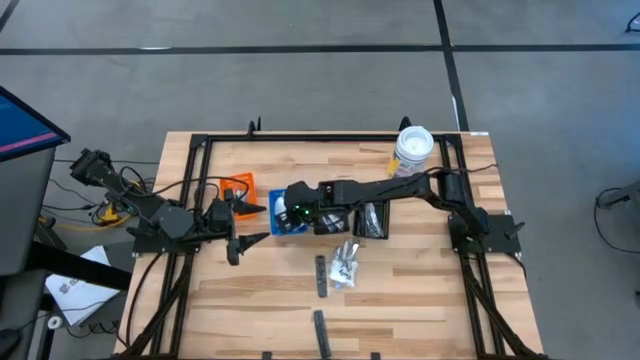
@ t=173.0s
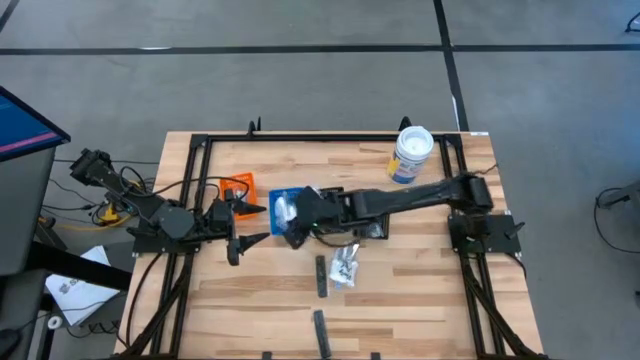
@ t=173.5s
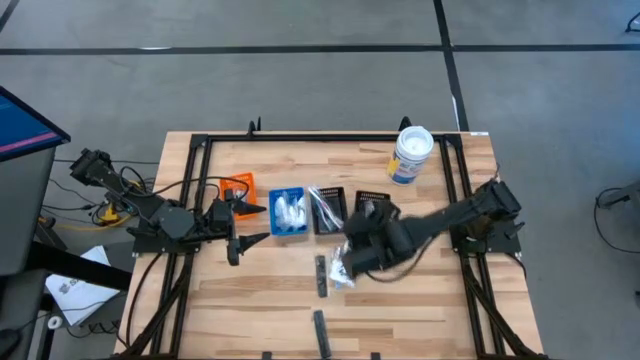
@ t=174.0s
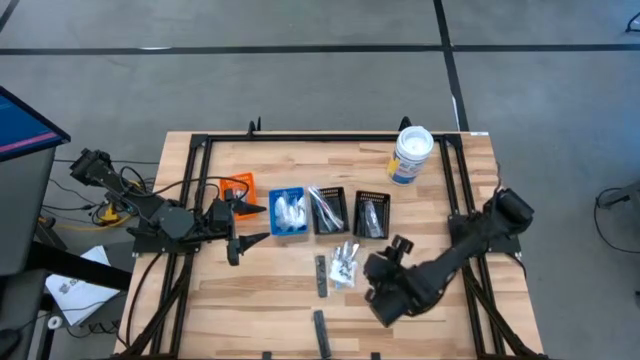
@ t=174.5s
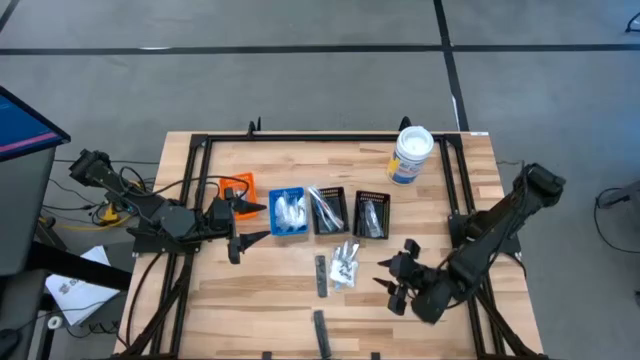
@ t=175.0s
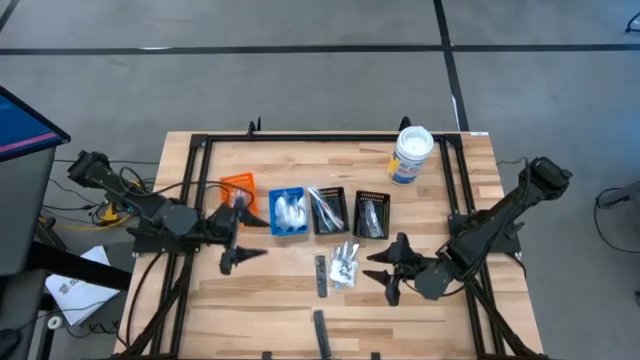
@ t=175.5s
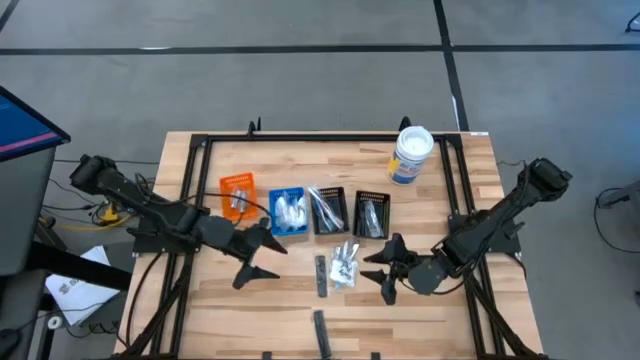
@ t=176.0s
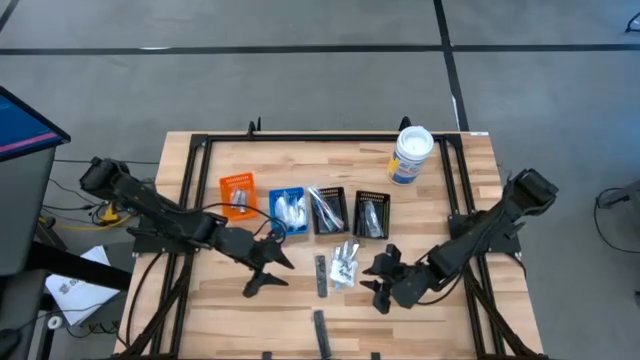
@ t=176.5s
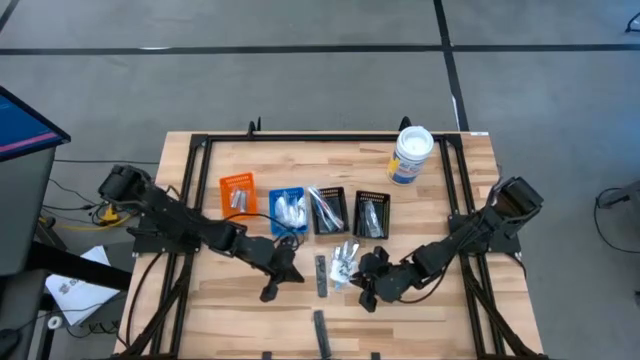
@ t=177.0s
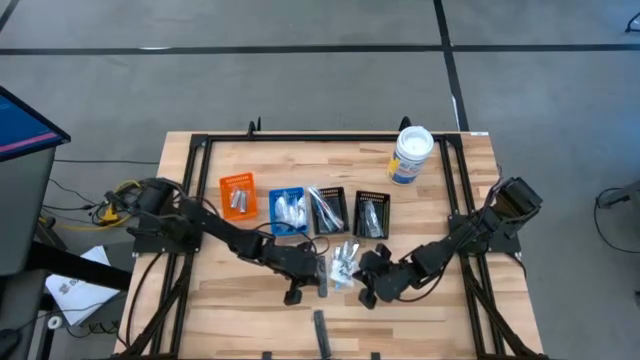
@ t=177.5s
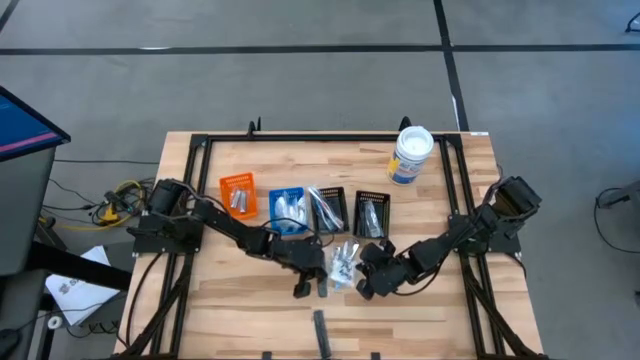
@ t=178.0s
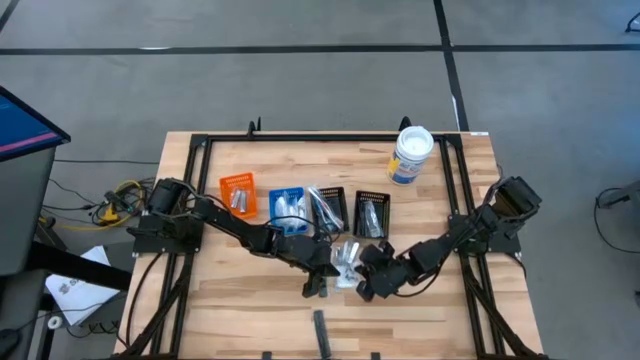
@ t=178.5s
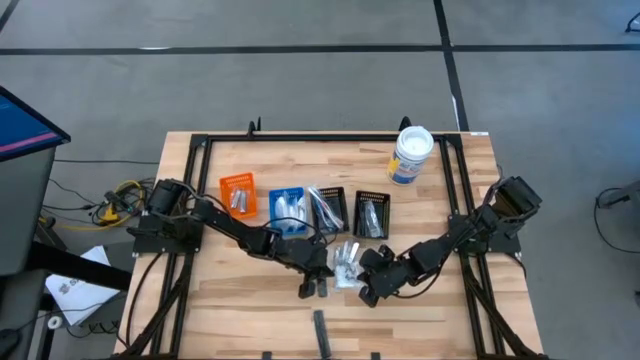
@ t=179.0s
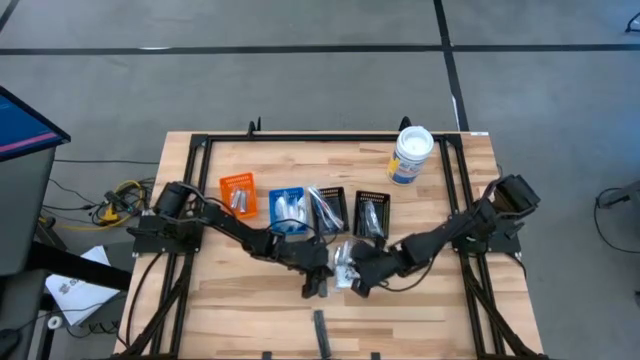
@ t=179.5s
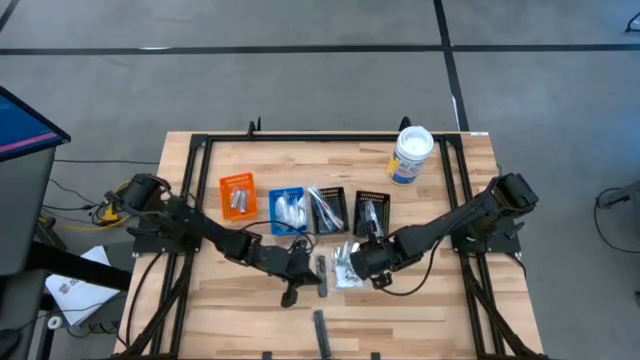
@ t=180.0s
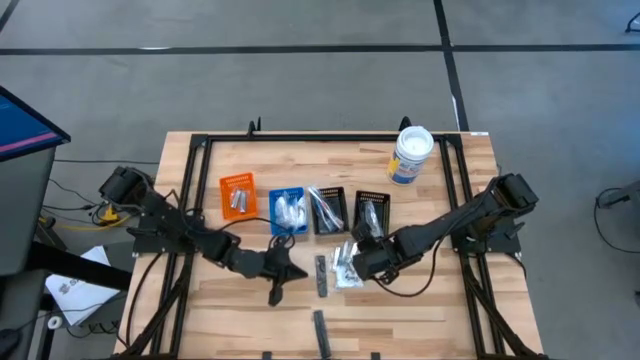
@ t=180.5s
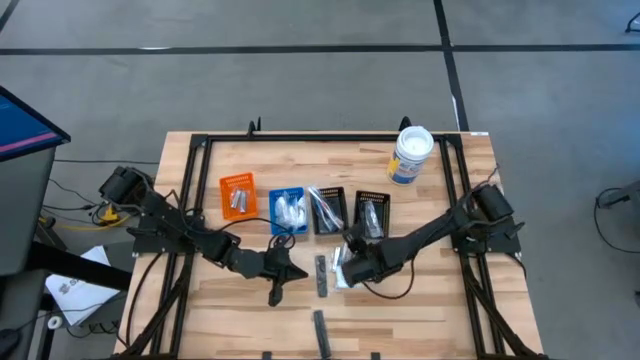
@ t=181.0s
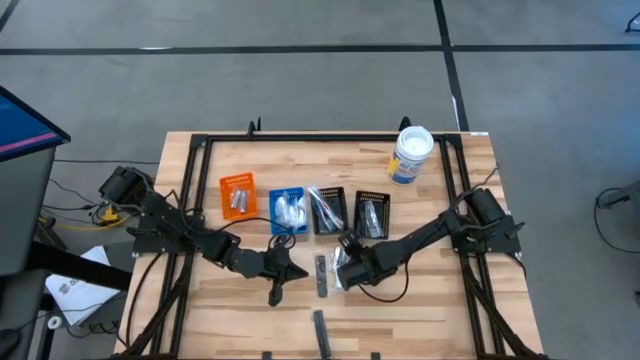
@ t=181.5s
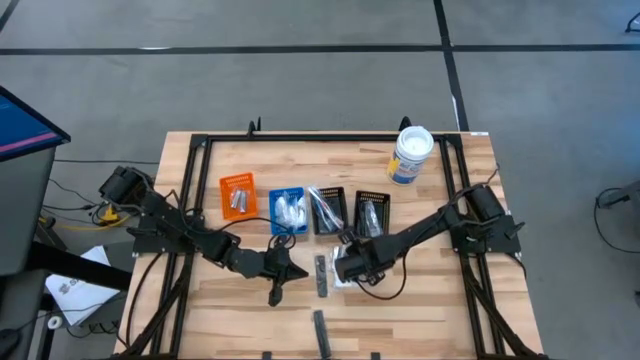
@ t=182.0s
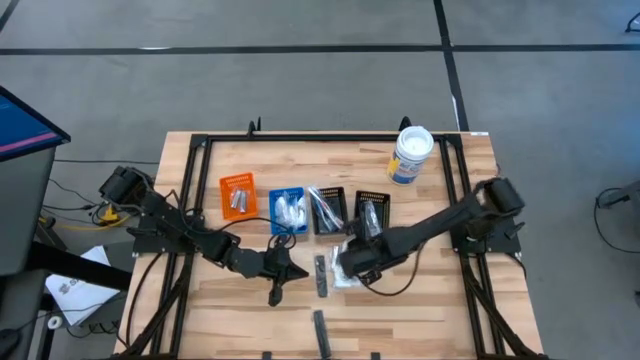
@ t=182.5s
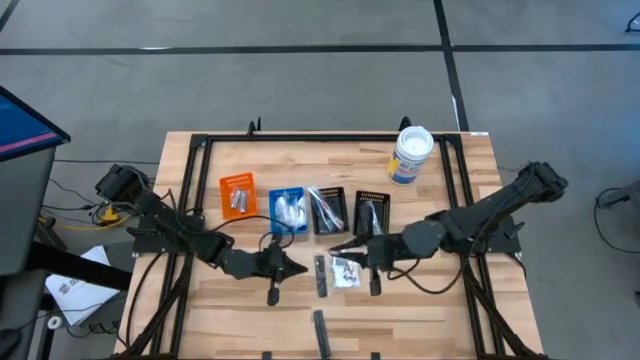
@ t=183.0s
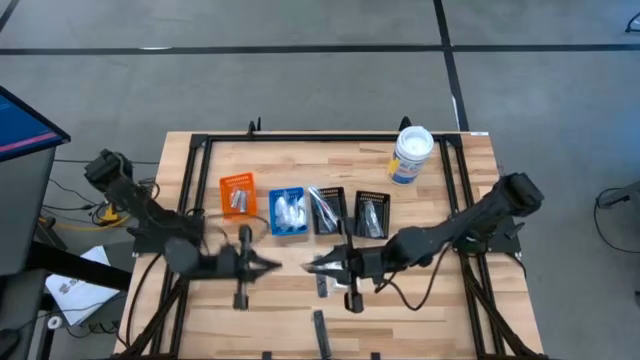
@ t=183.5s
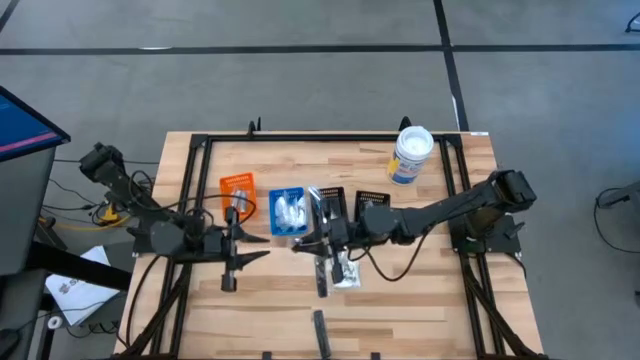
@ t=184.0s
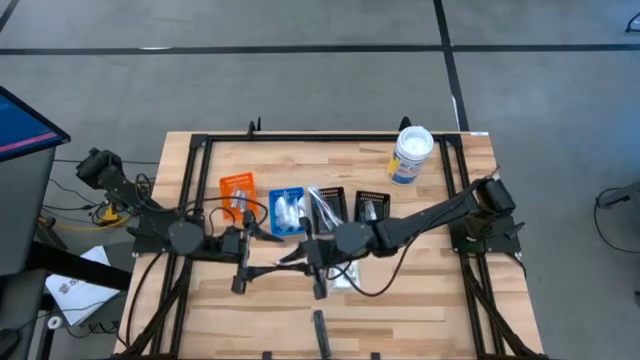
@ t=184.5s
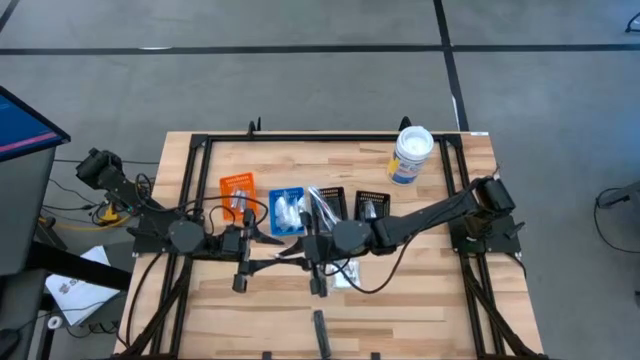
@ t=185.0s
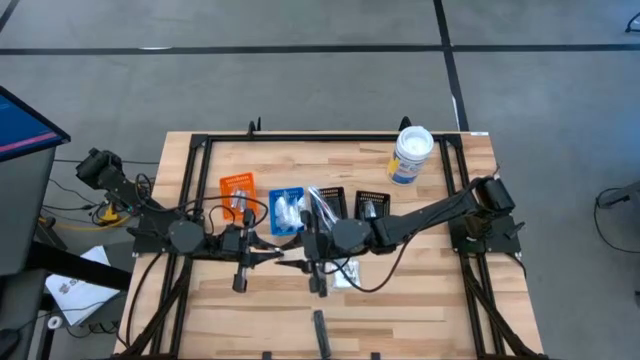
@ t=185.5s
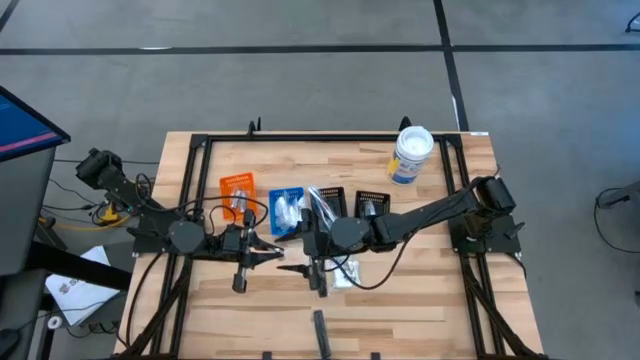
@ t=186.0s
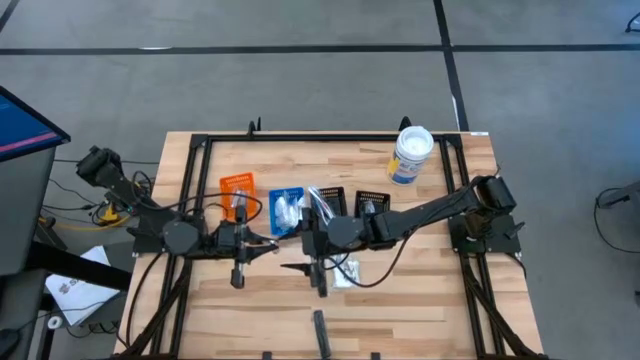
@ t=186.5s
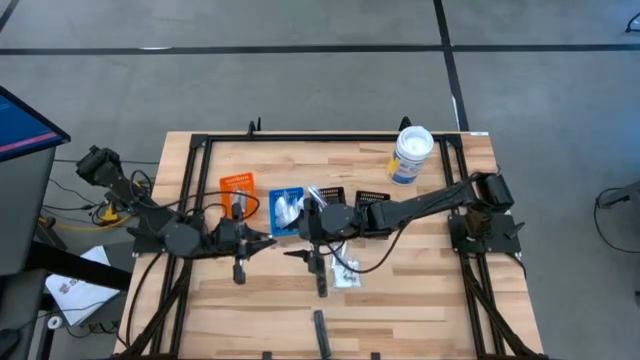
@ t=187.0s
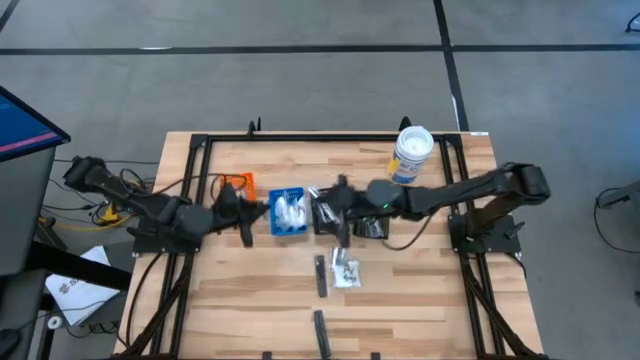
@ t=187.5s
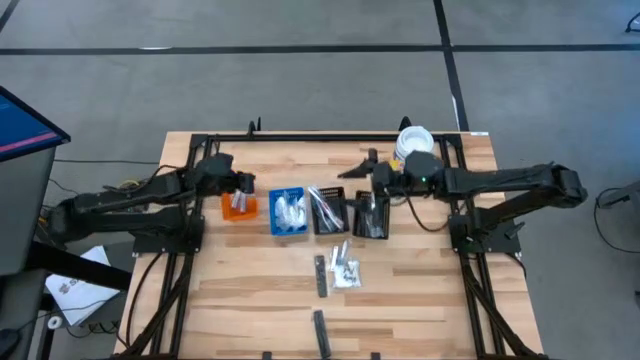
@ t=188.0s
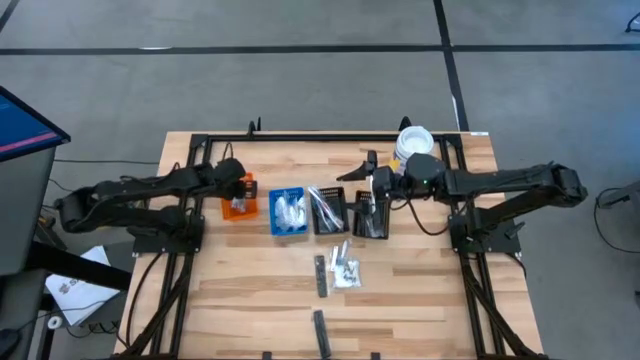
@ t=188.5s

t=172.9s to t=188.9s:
Task: Pick & Place Travel size toiletries
Put the nail clippers into the orange bin

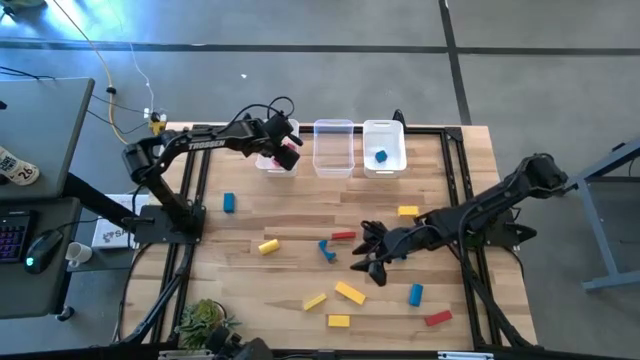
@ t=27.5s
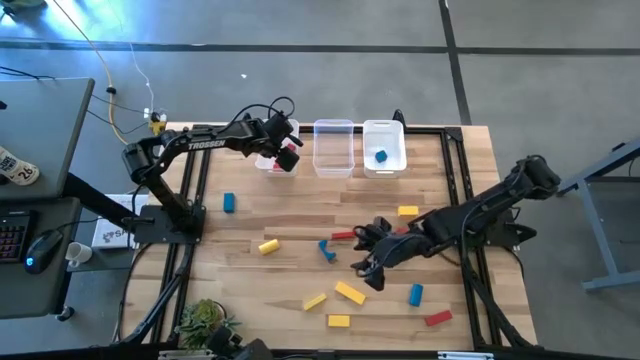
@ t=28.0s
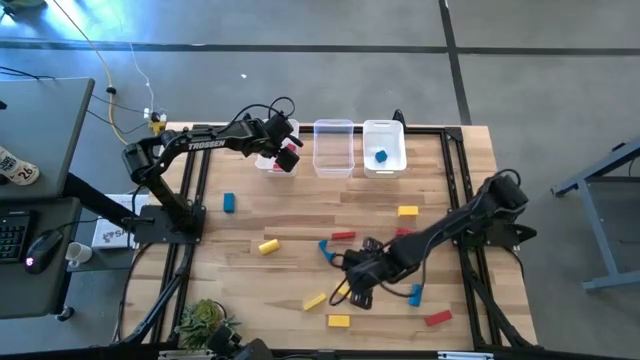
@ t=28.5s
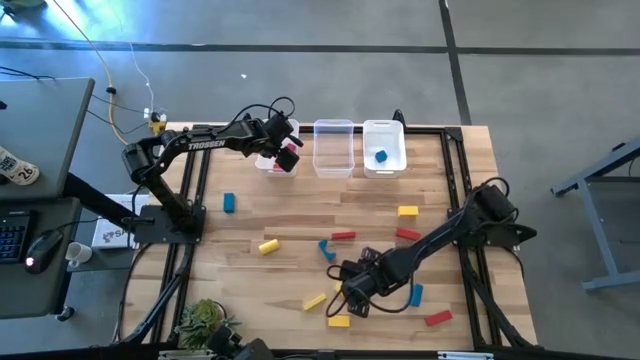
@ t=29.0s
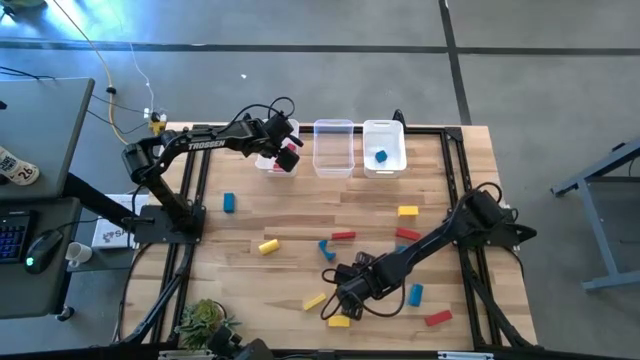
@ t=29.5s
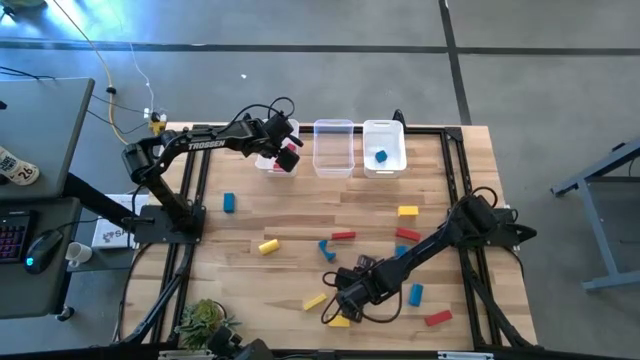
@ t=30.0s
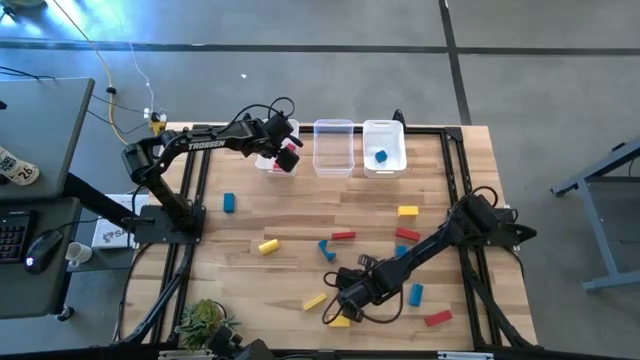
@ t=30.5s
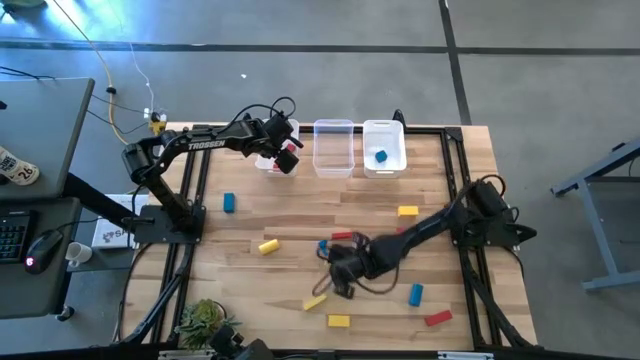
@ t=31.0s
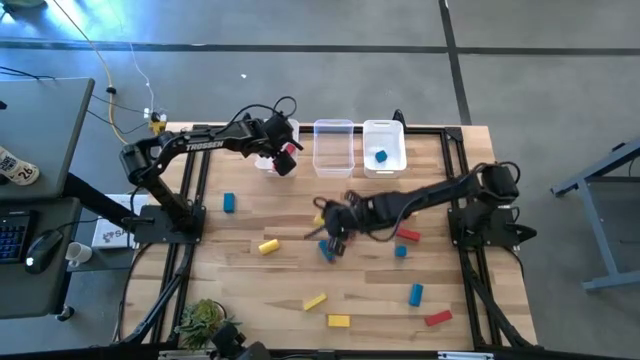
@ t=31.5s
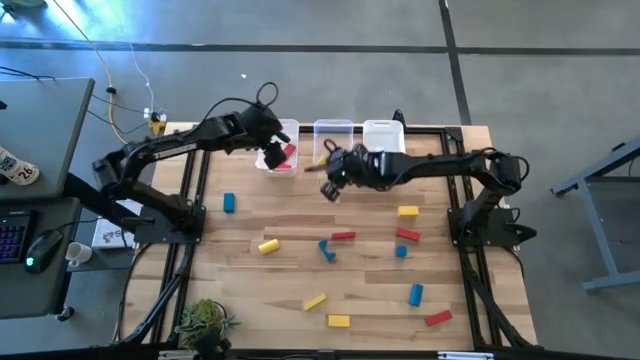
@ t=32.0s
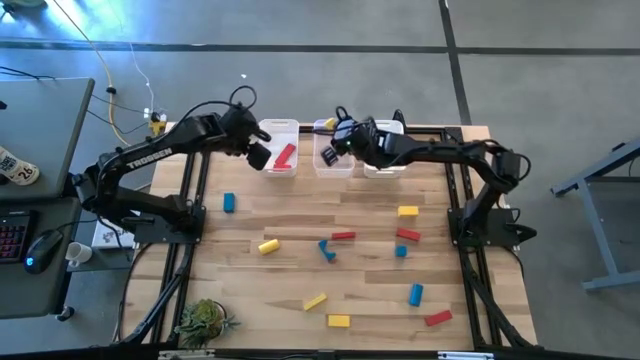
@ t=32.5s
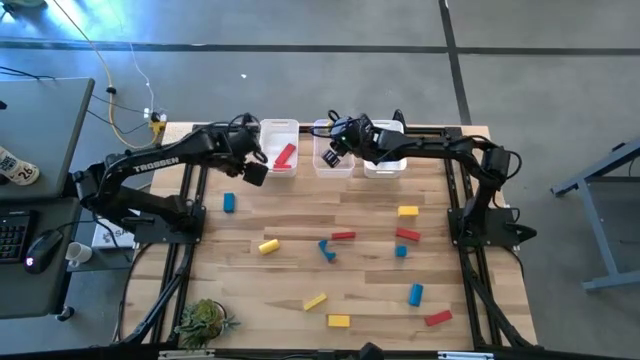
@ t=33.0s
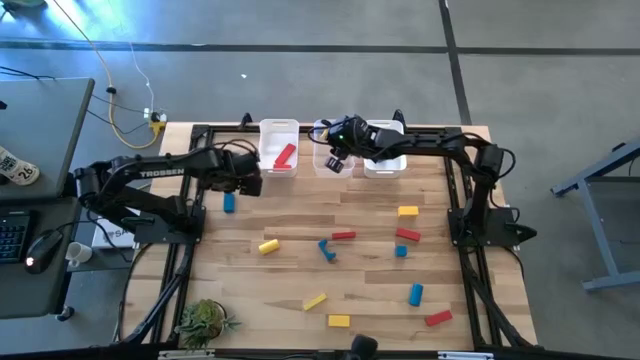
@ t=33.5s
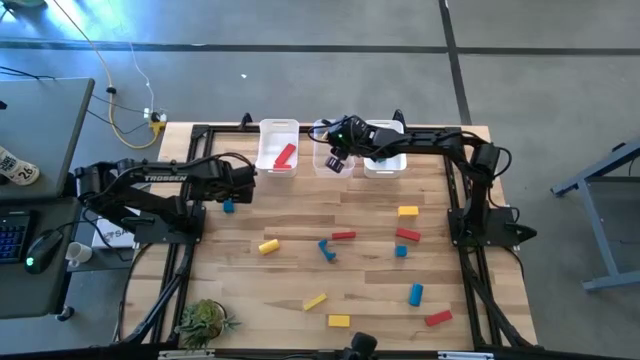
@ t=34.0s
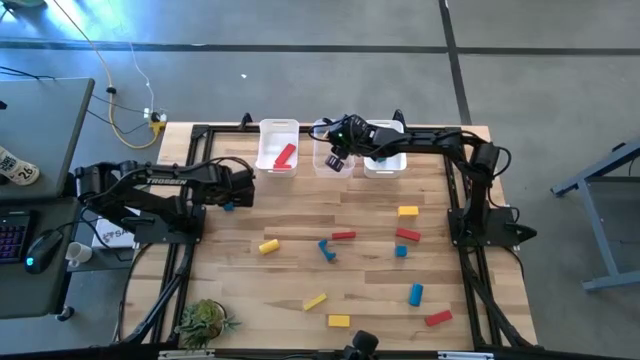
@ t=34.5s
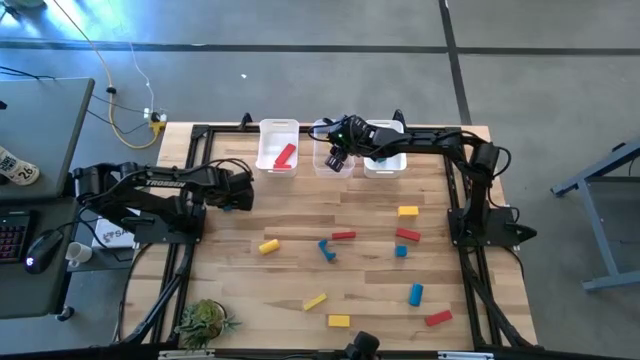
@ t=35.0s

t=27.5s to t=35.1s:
Task: Sort & place blocks by color
Put the yellow block into the transparent bin
